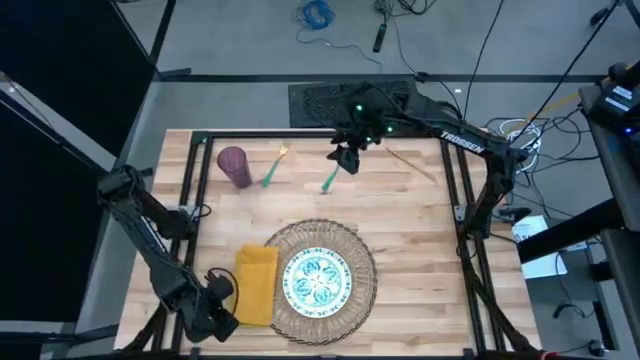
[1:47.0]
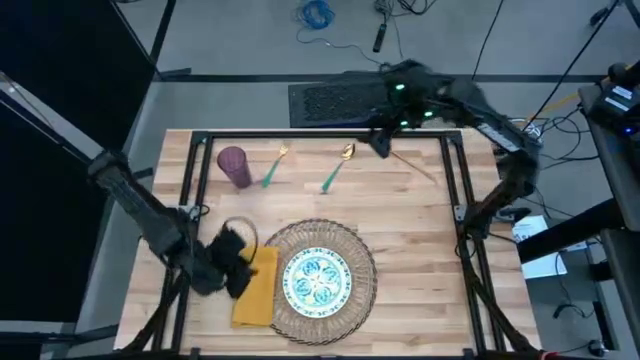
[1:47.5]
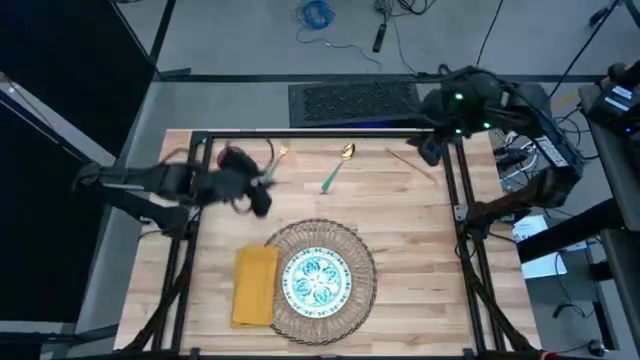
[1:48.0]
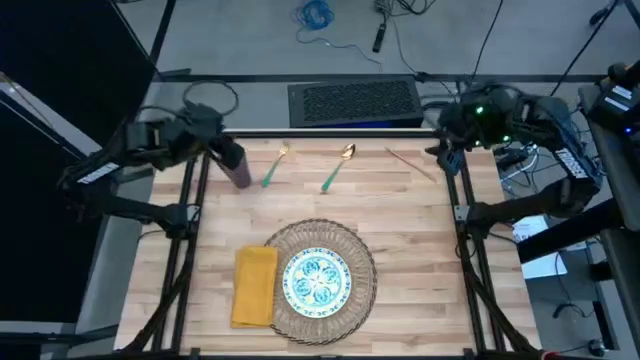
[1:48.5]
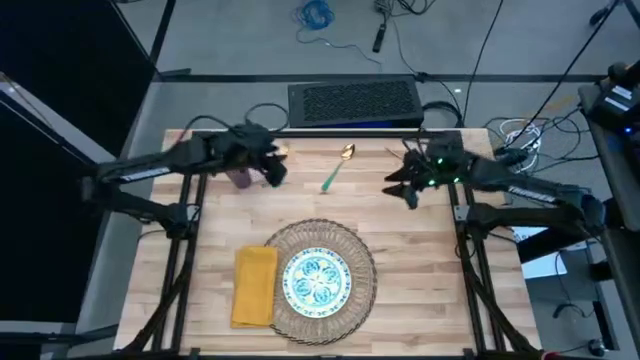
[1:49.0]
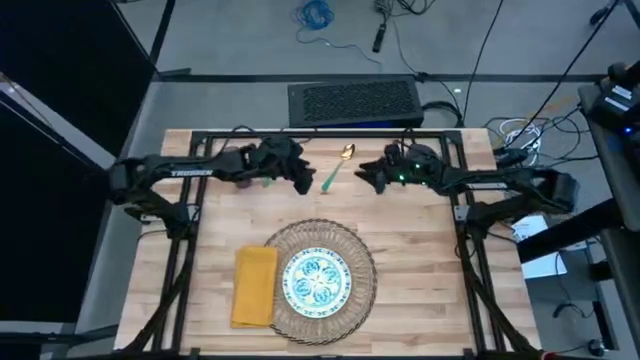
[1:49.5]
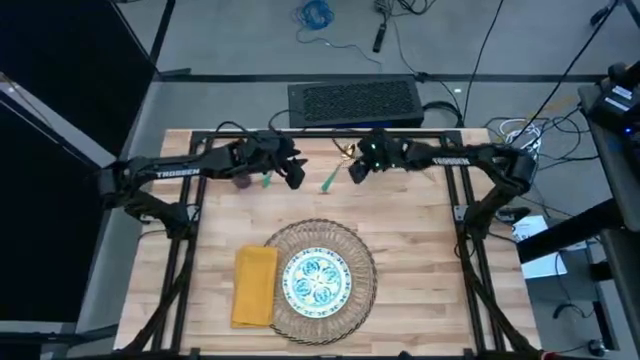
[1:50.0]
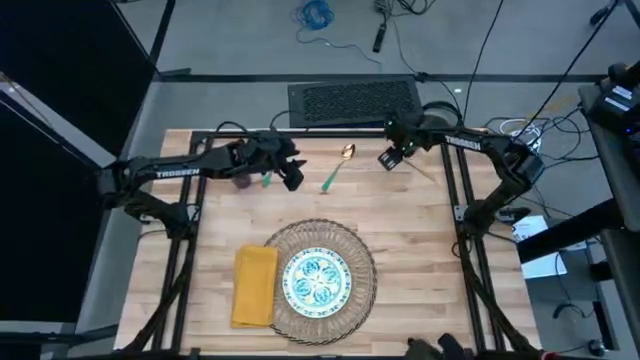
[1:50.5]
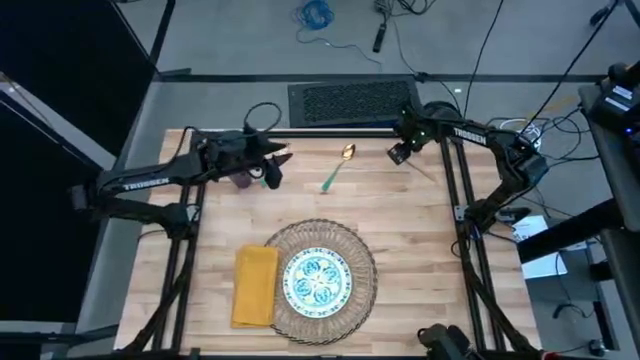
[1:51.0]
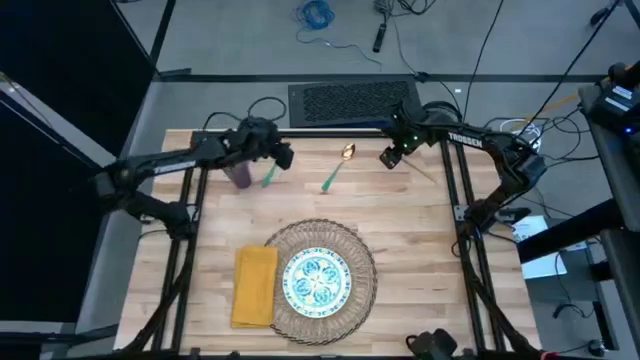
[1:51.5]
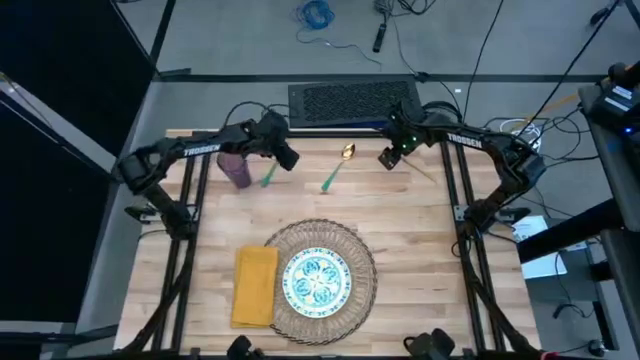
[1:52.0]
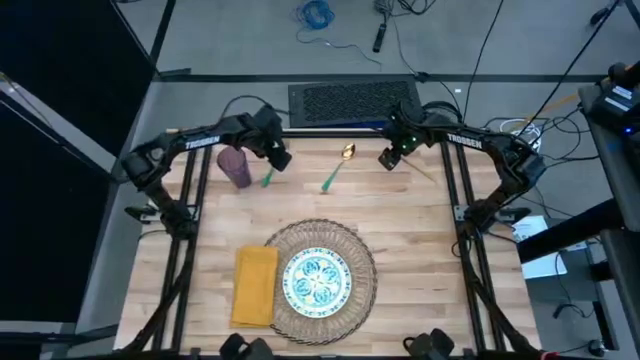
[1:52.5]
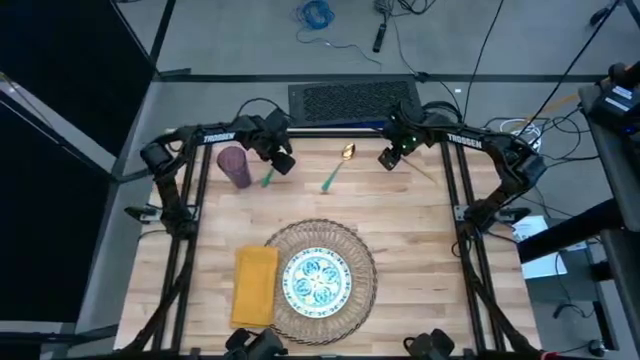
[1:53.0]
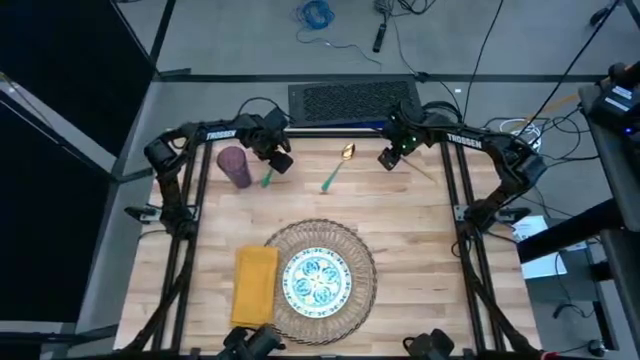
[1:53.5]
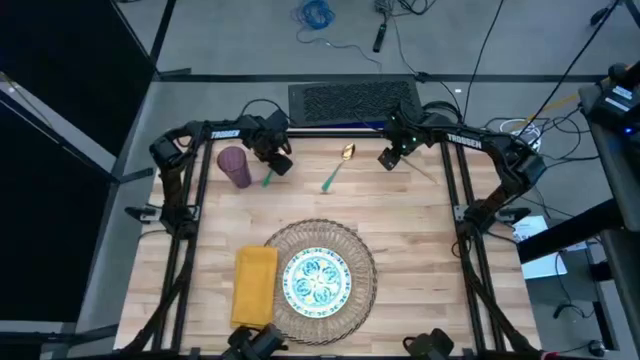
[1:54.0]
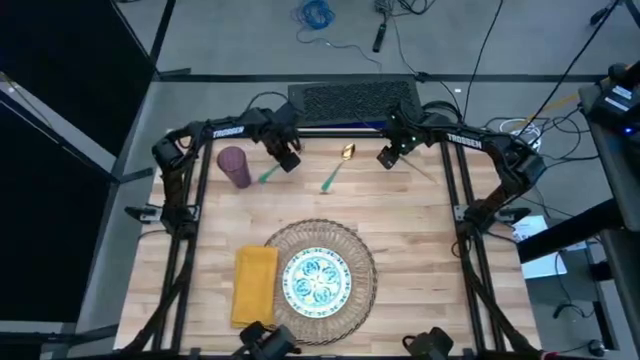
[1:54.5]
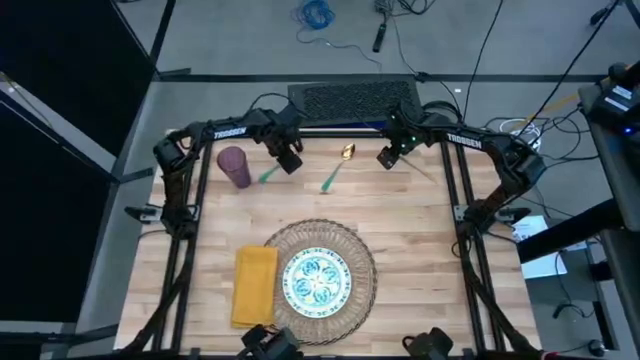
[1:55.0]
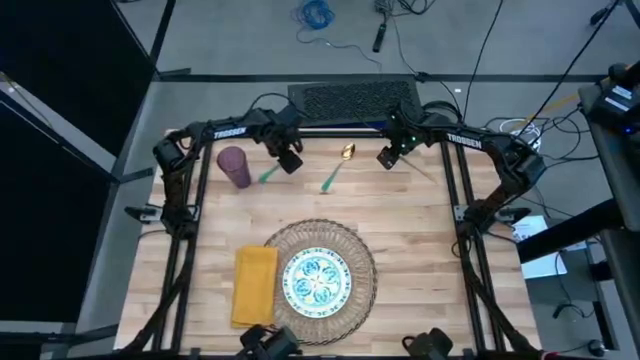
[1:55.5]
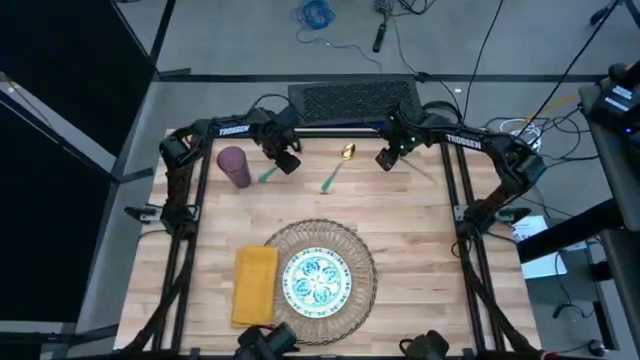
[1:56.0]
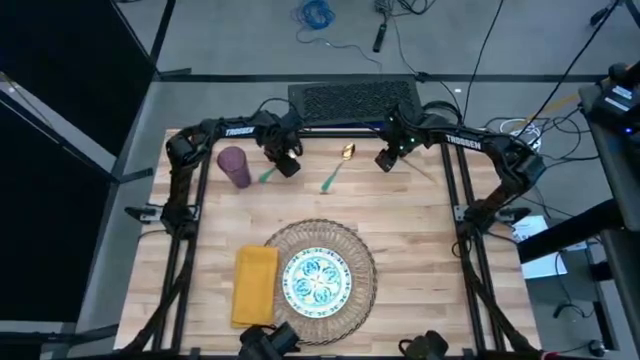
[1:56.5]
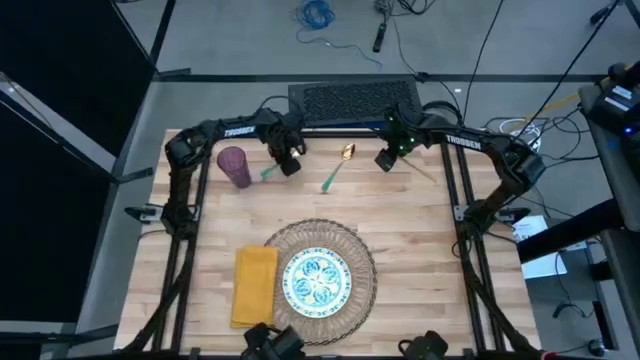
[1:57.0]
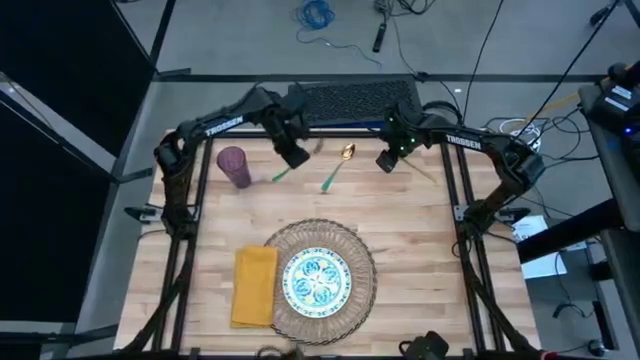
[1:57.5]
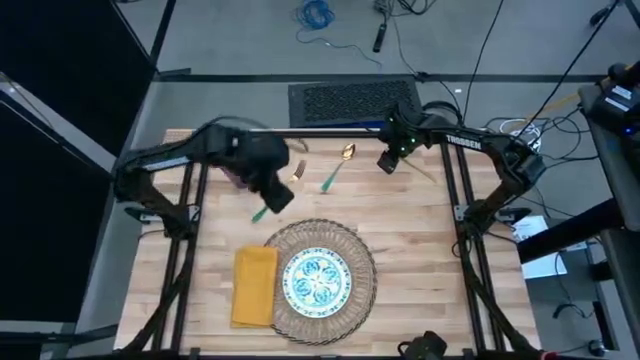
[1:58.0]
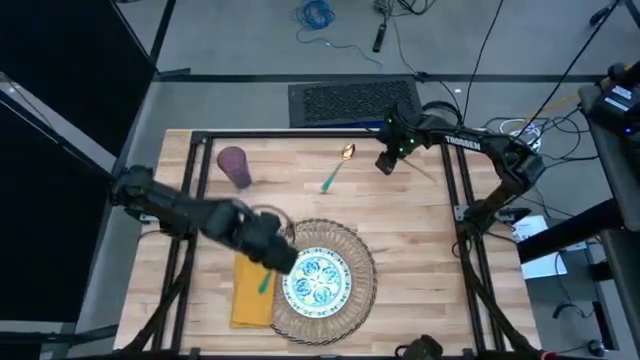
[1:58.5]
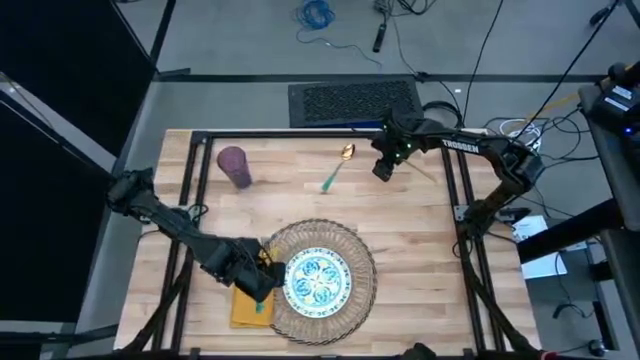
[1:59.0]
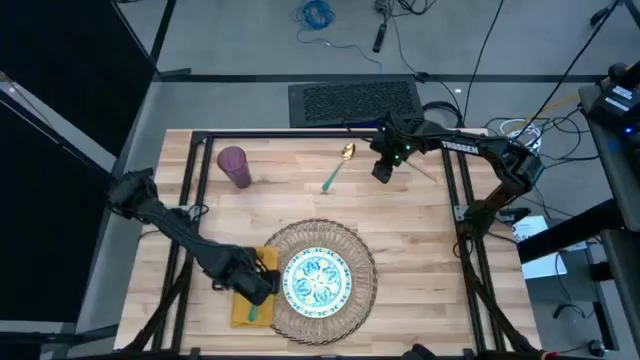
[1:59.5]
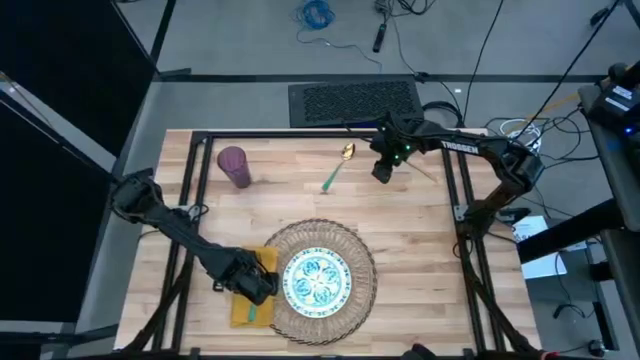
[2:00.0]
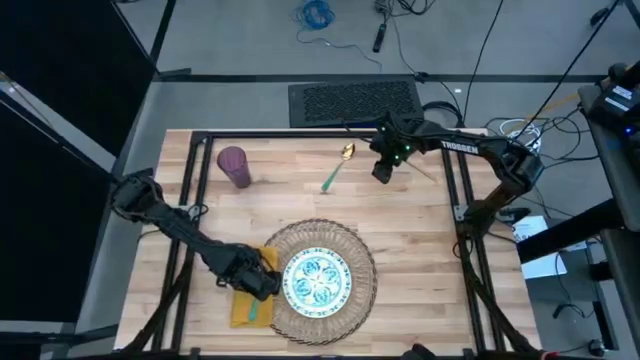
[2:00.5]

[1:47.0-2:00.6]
Task: Set table place
Put the green fork on top of the yellow table napkin

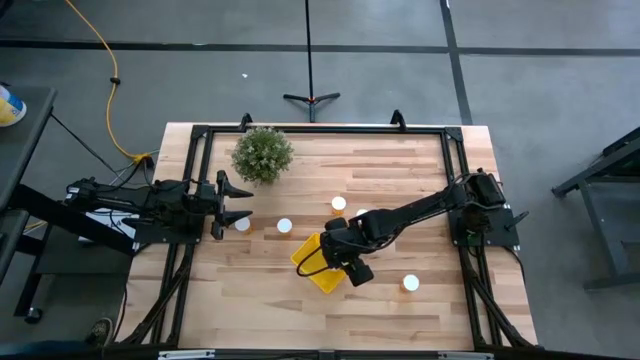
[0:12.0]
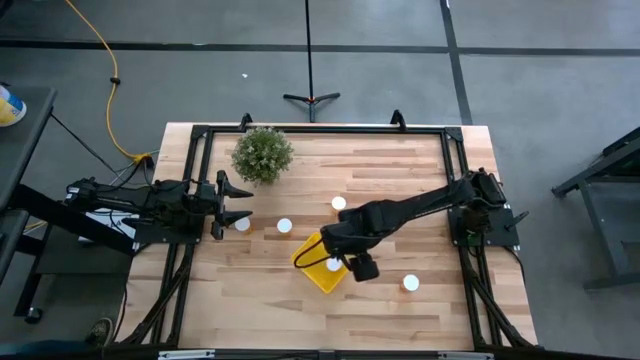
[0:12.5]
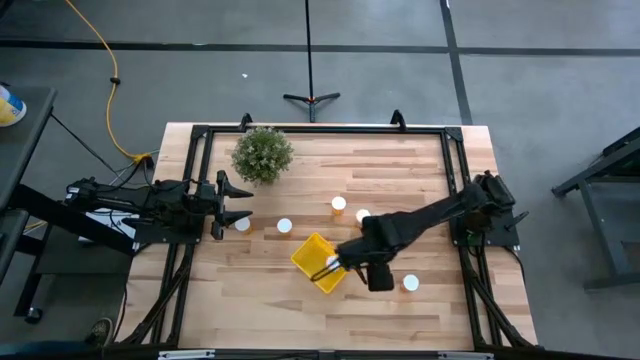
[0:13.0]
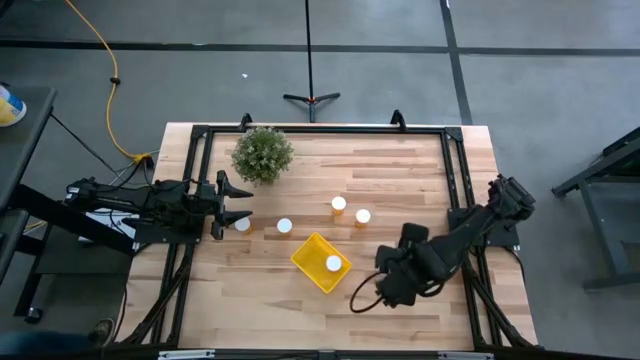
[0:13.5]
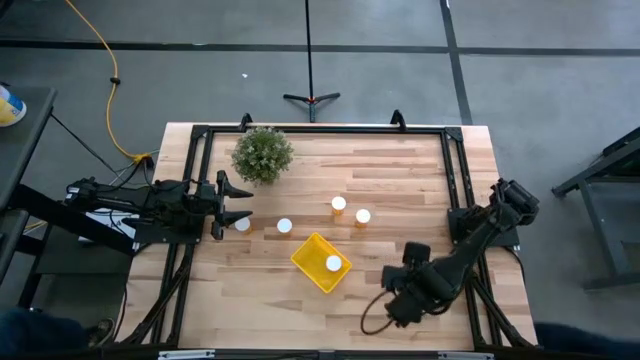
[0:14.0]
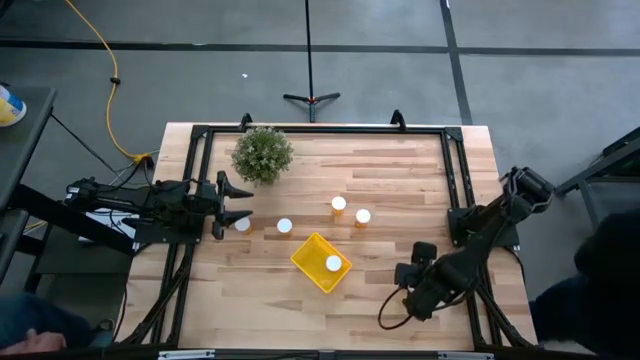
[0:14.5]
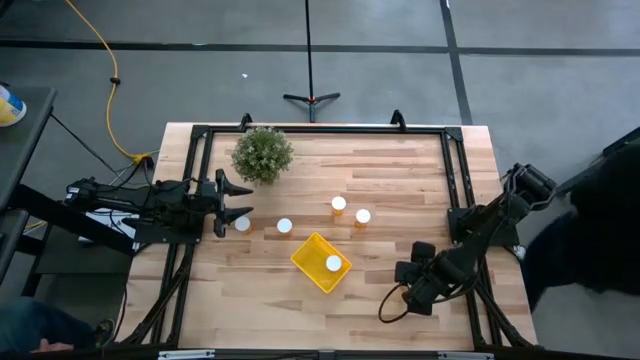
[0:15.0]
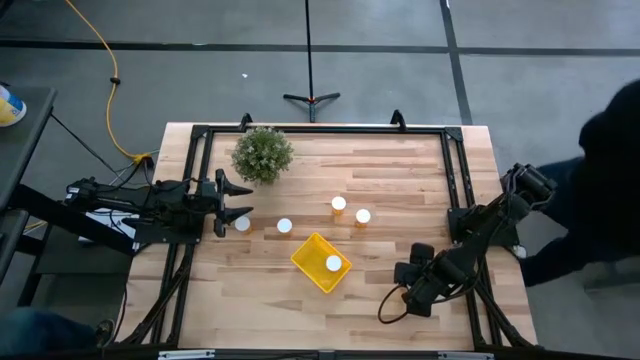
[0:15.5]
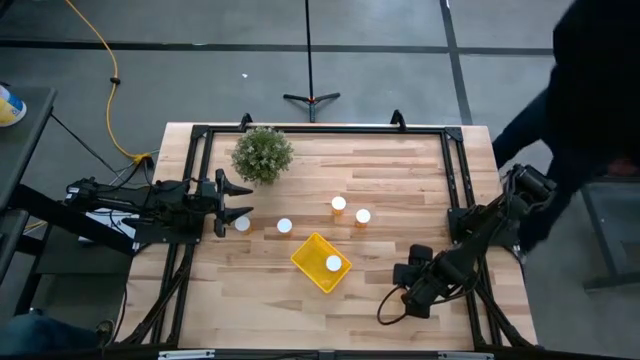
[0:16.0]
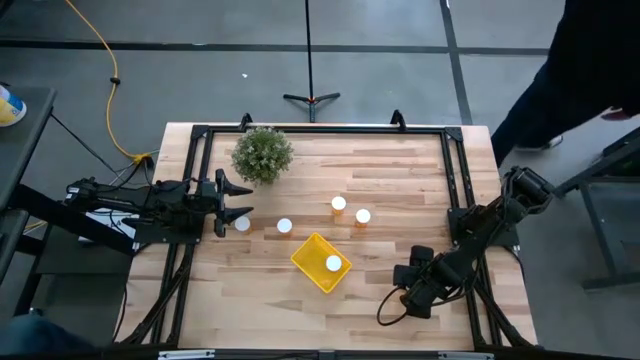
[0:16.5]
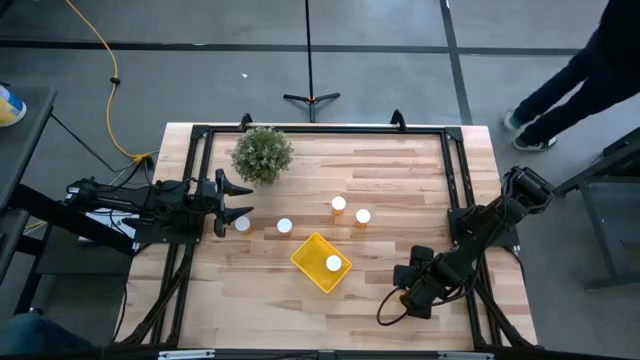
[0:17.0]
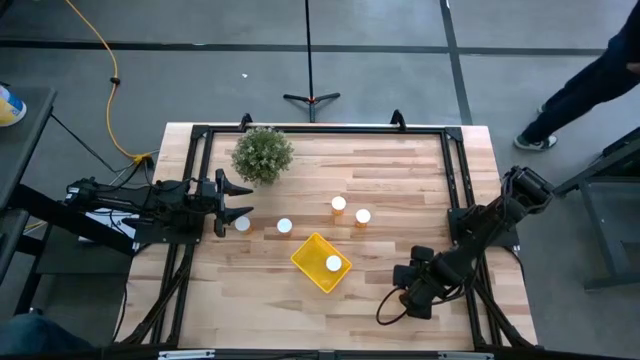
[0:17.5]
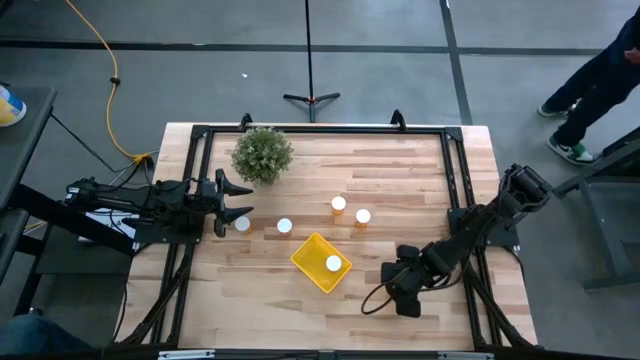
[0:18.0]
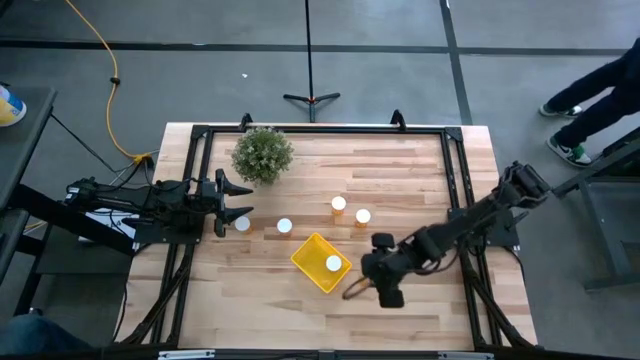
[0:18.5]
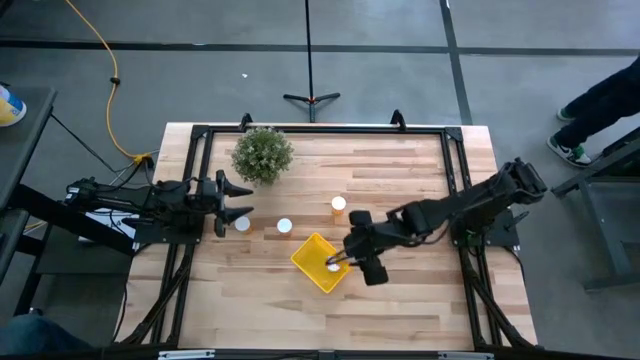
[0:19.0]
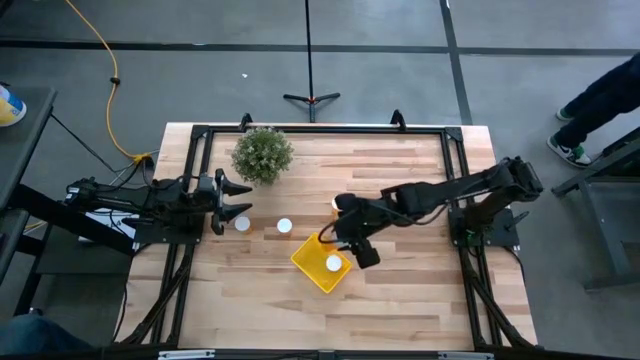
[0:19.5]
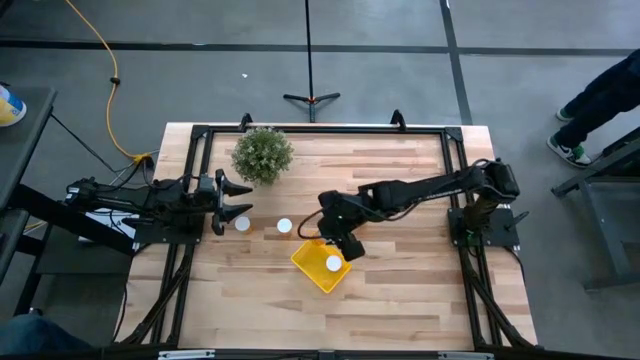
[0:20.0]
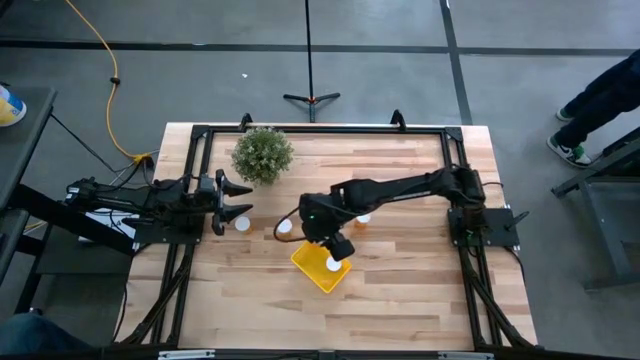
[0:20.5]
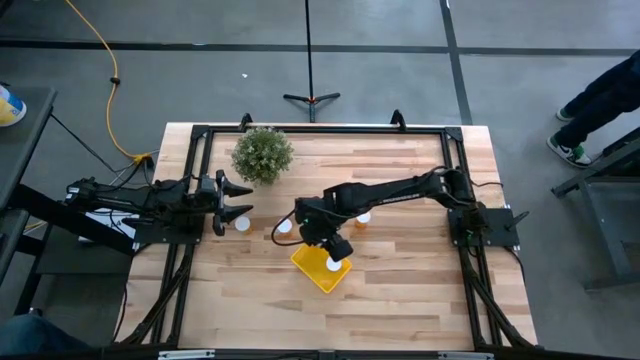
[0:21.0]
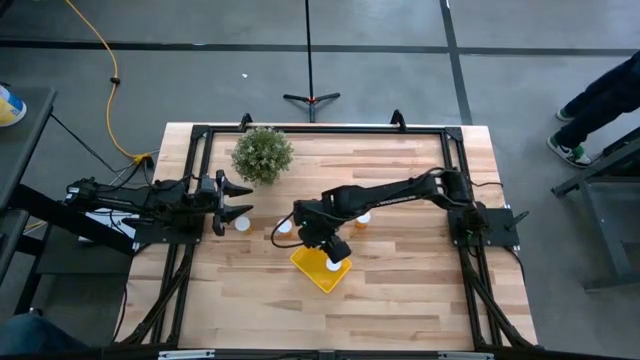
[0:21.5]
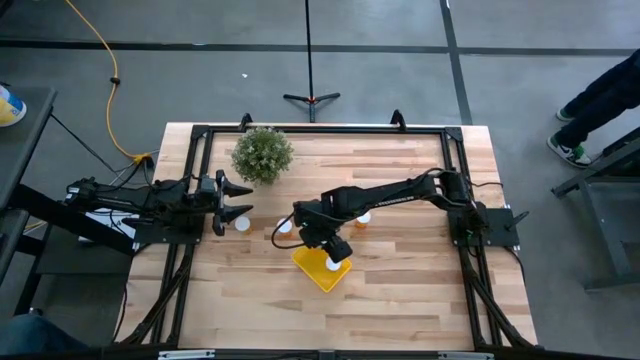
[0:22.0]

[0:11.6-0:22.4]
Task: Pick and place pill bottles into a basket
Put the pill bottle into the yellow transparent bin
